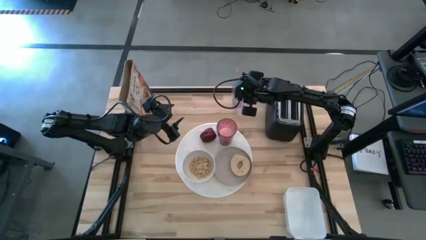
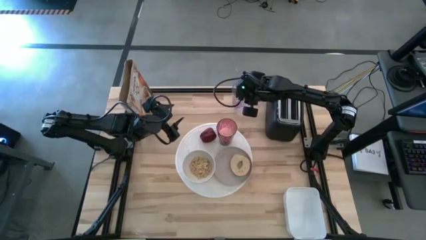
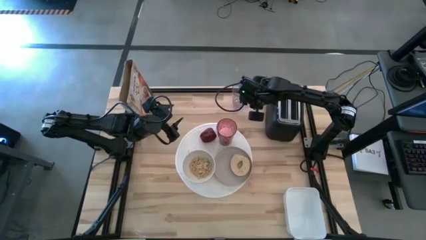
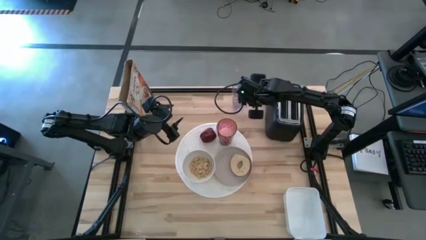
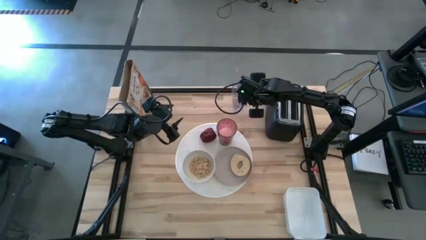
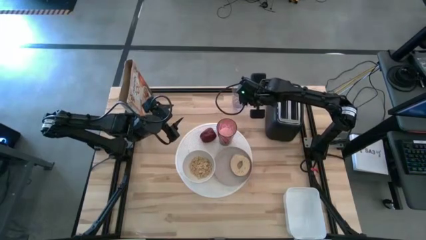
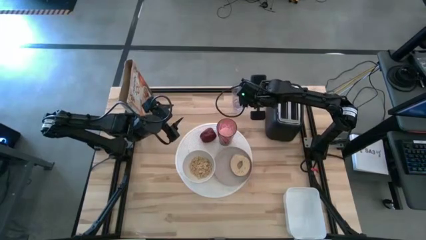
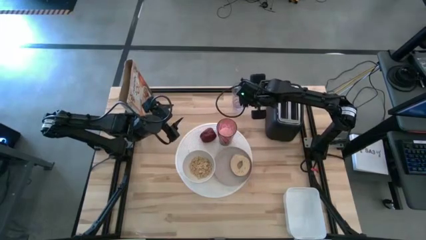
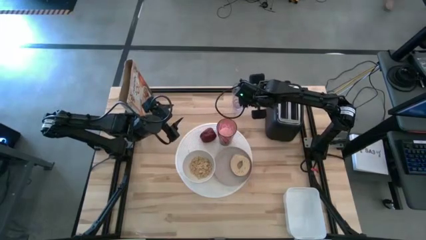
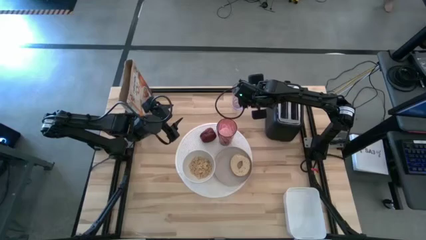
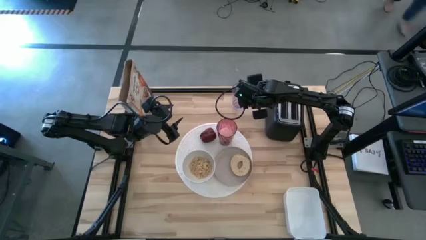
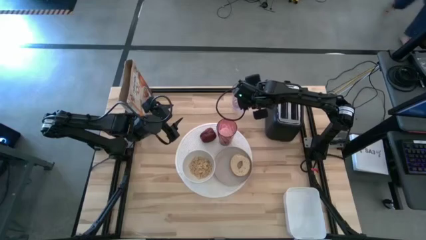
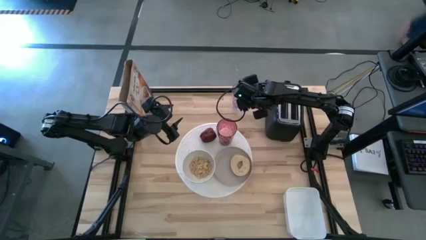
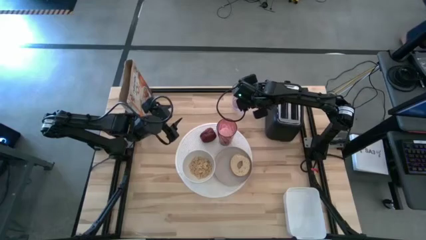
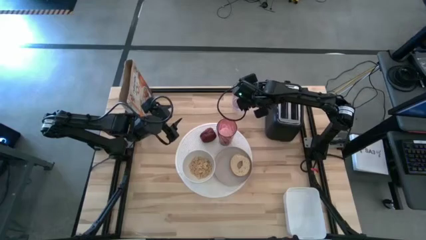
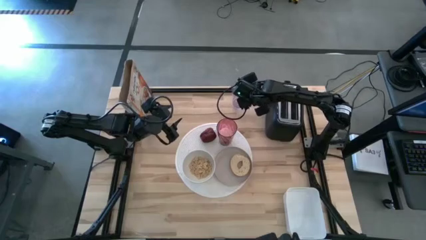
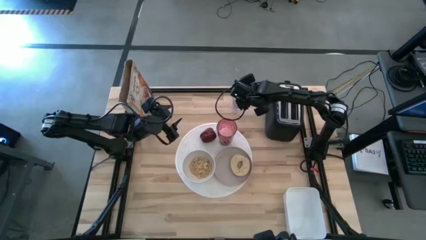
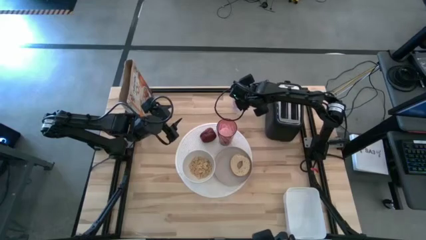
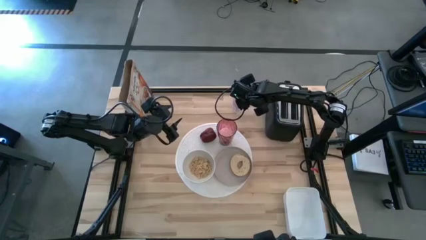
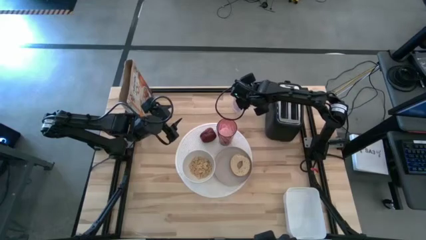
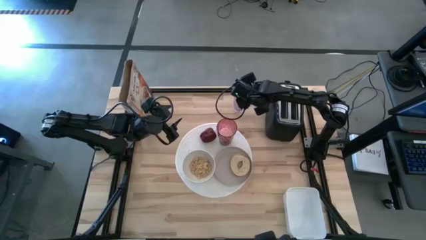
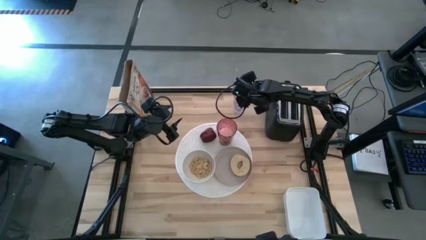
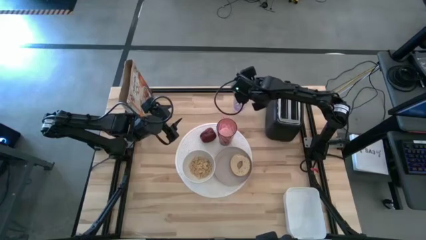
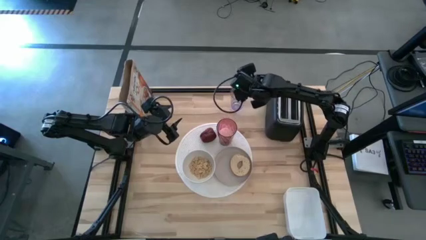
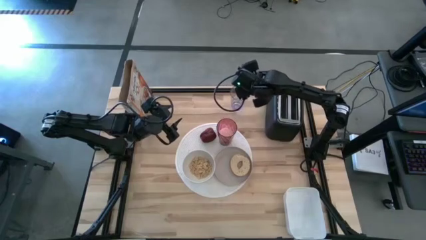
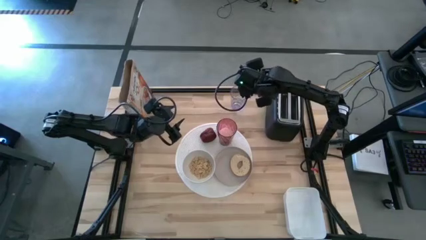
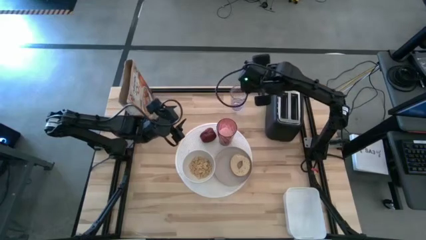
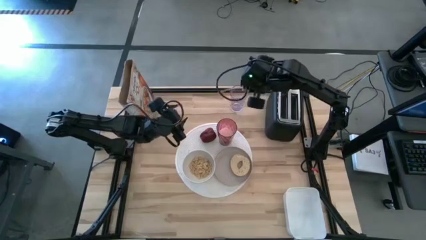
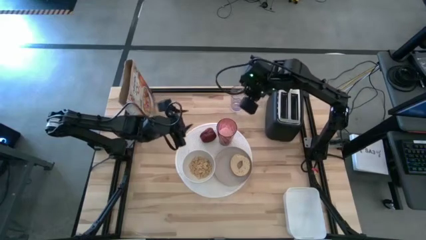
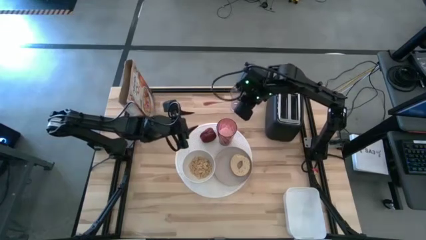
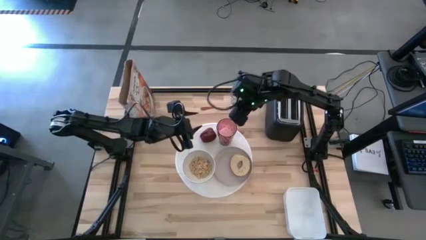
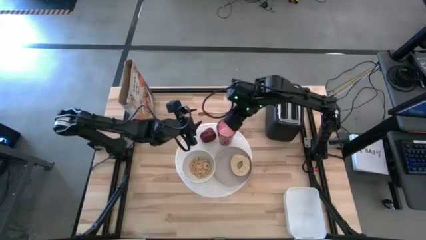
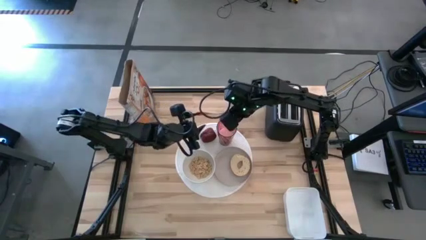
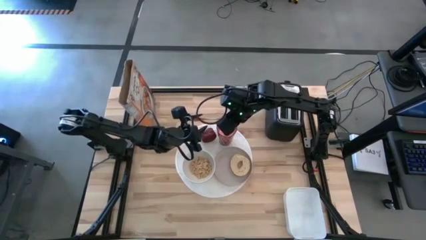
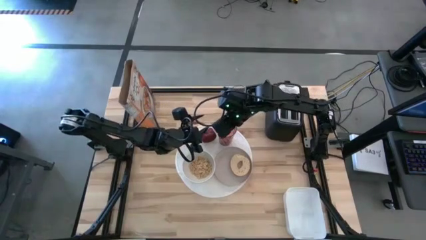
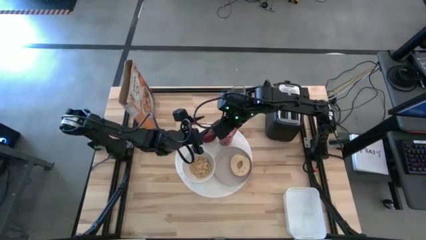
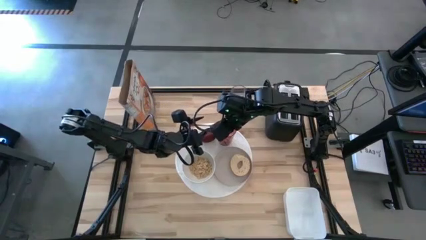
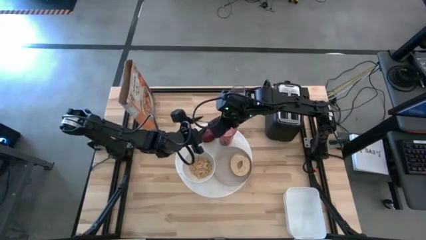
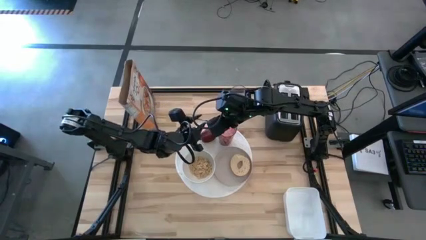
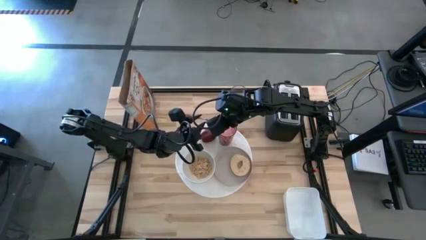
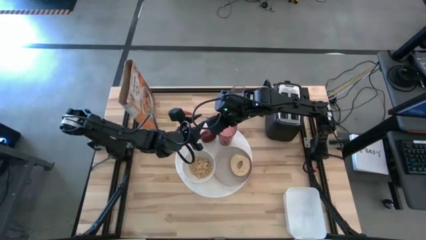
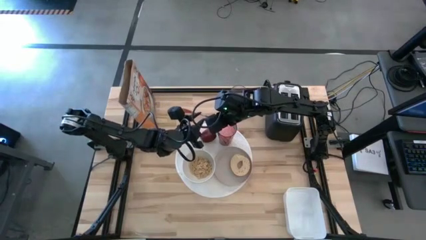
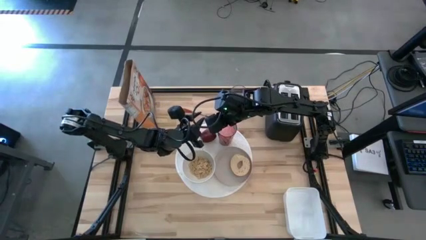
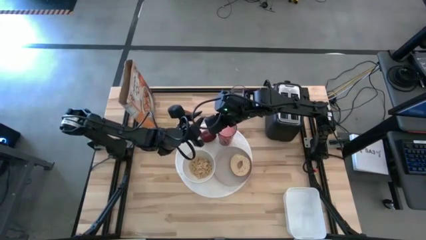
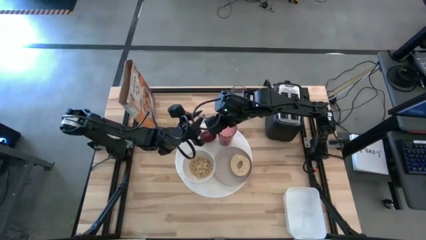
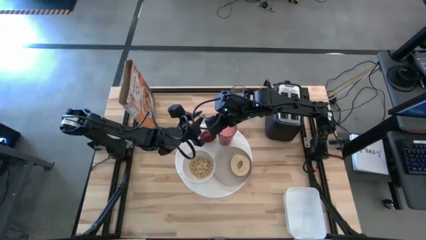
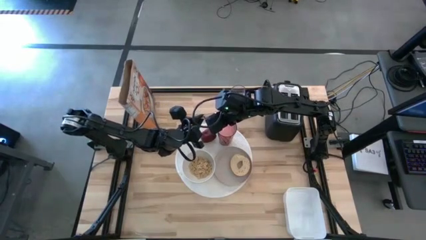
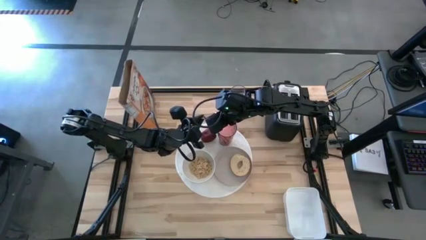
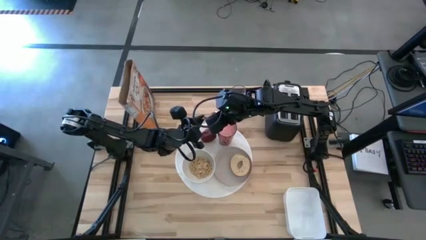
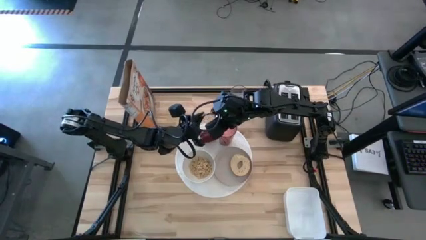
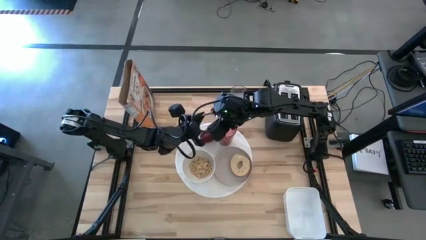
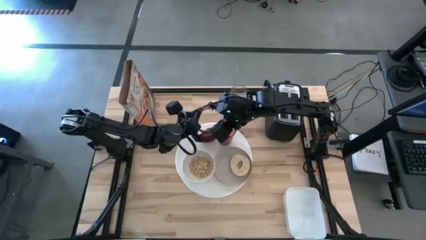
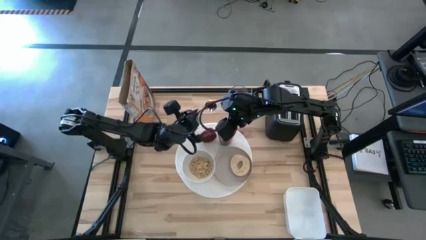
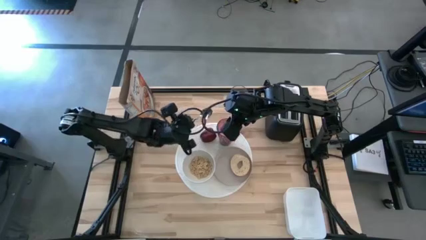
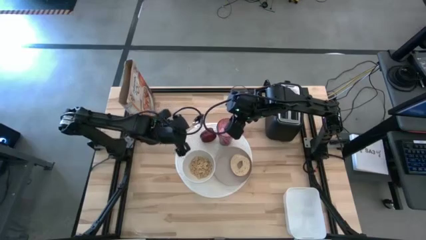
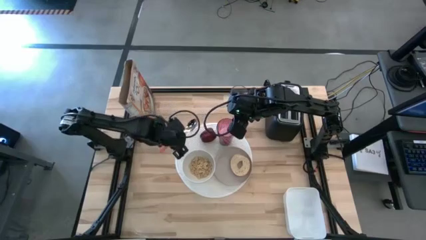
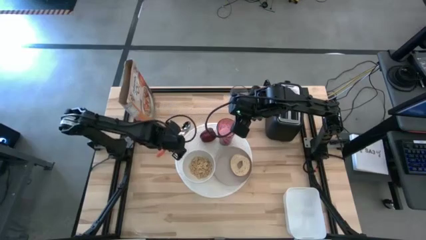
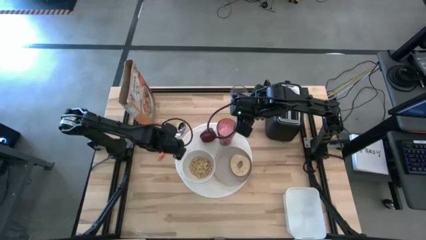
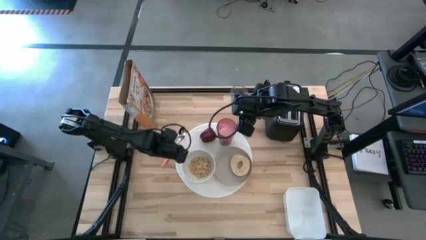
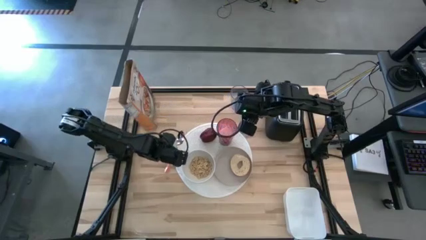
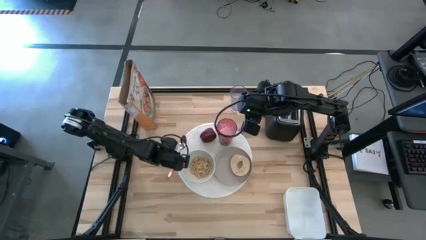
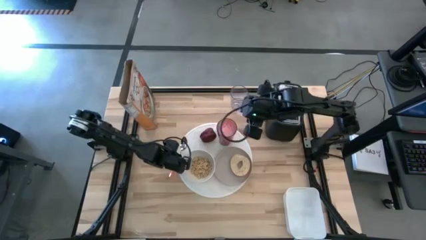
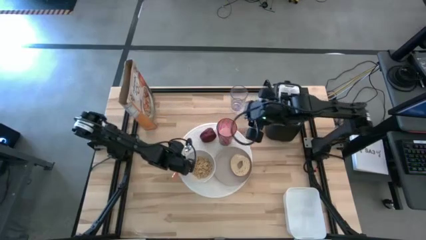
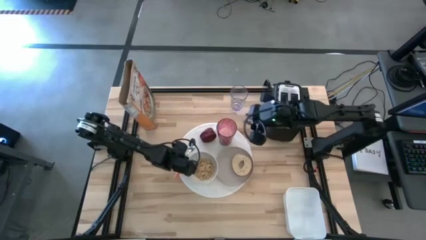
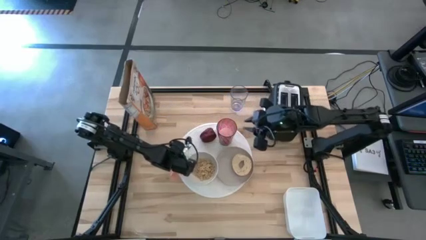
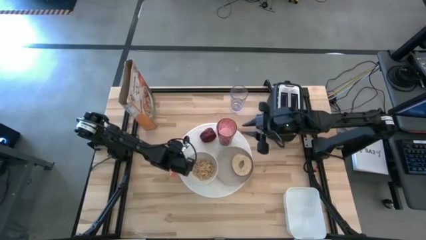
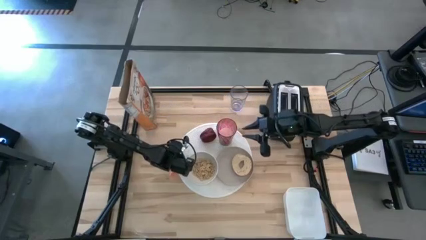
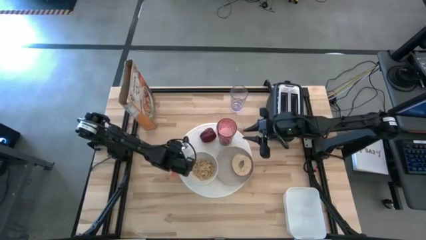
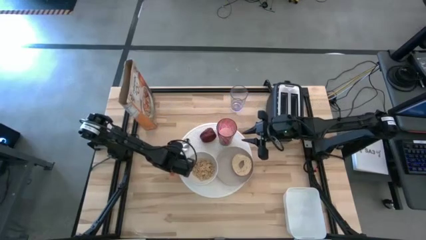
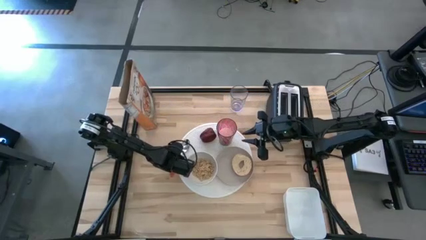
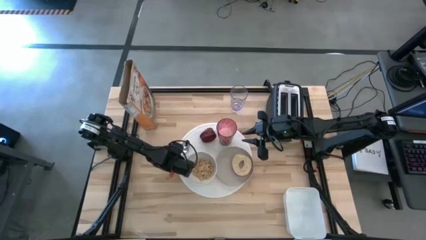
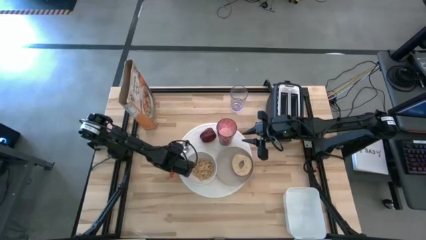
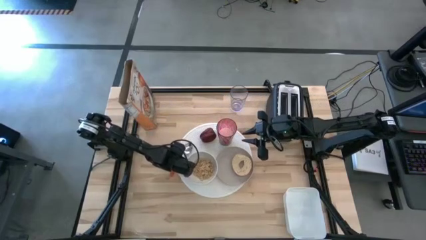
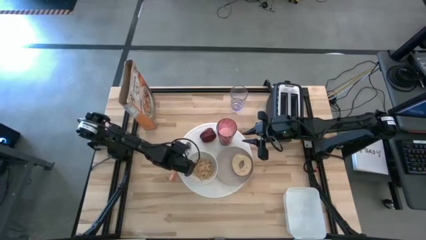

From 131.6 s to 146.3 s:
Task: Arrange a breakfast setting
Put the silver spoon on the white table mat to the left of the white bowl

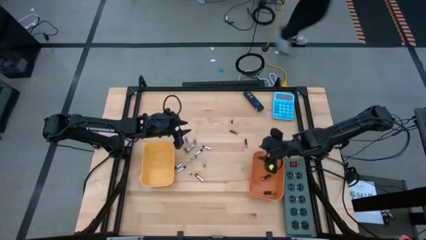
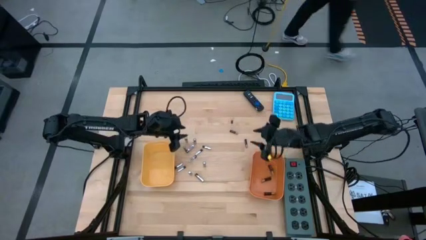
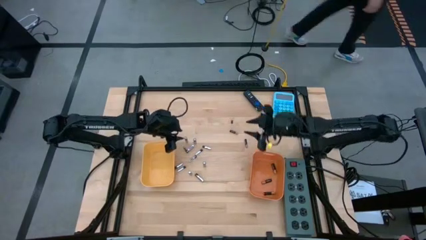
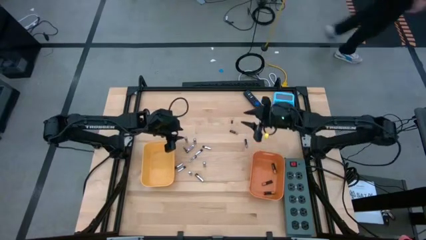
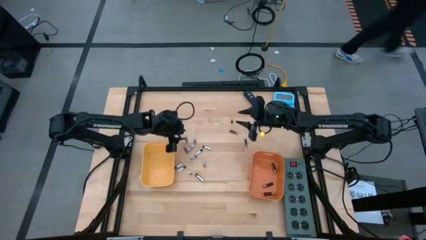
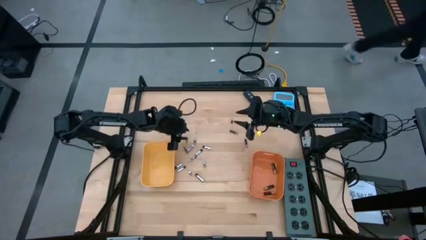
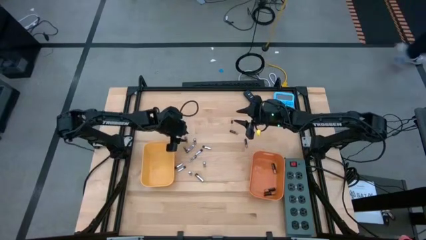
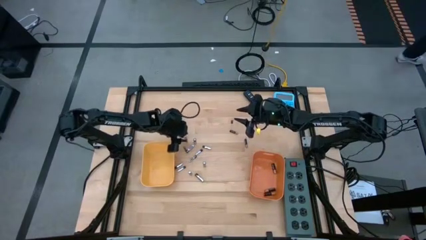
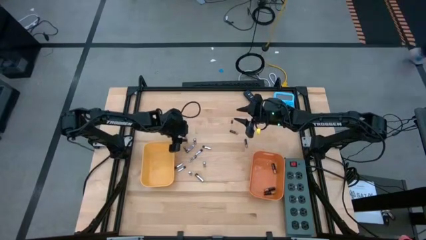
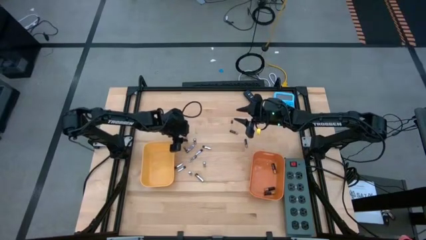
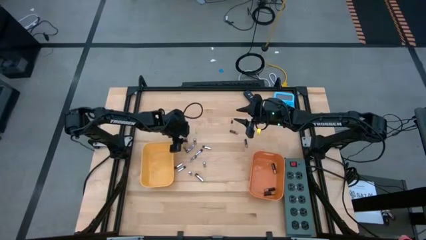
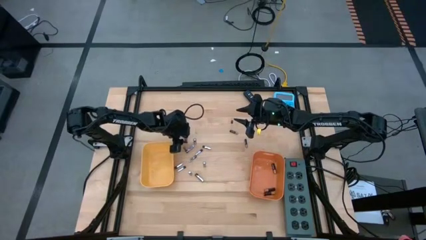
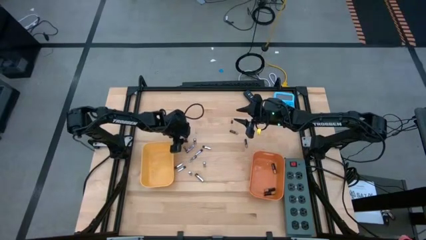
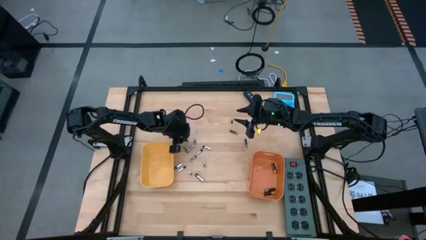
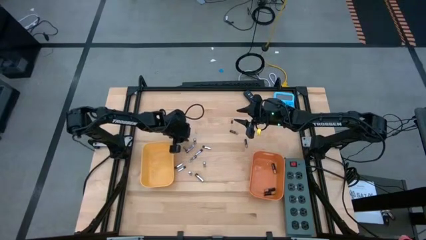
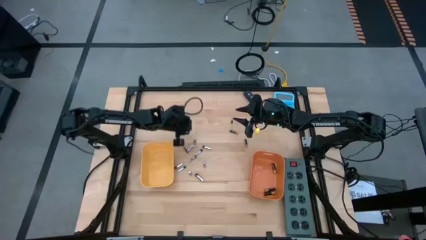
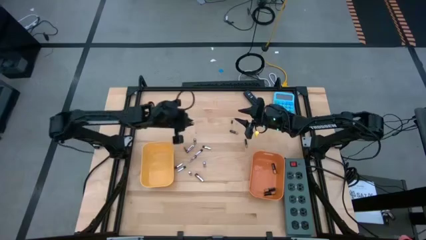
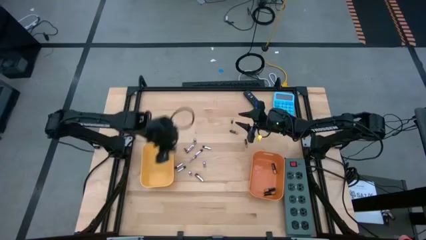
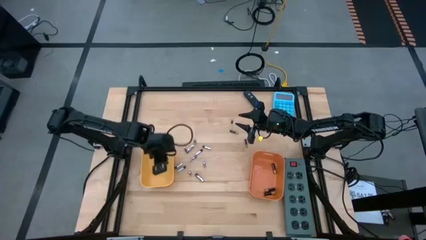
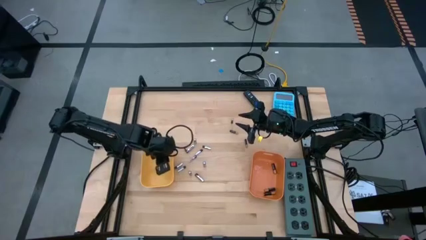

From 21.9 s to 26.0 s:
Task: Sort batteries
Put the silver battery into the yellow bin
